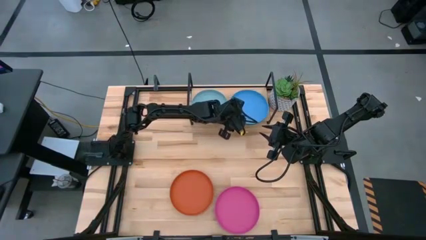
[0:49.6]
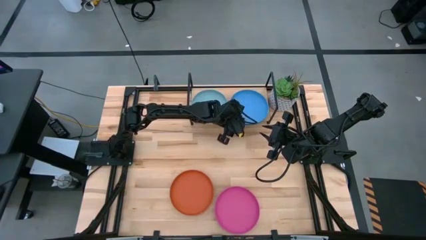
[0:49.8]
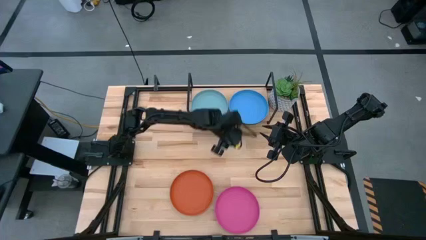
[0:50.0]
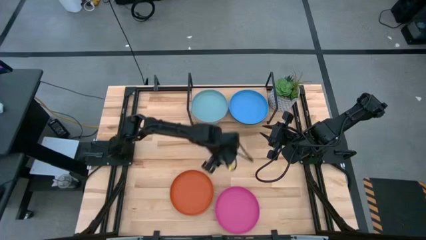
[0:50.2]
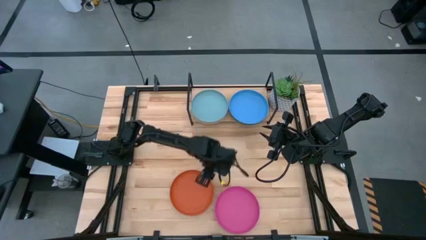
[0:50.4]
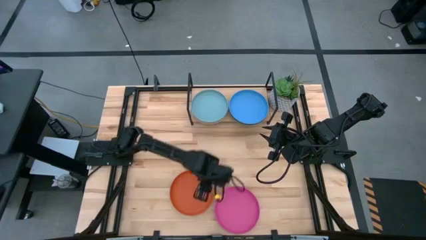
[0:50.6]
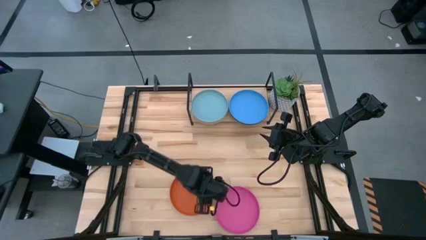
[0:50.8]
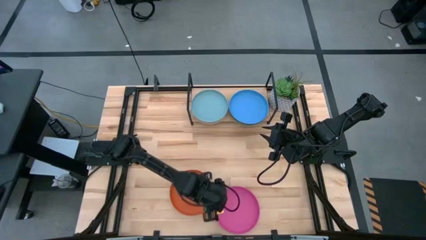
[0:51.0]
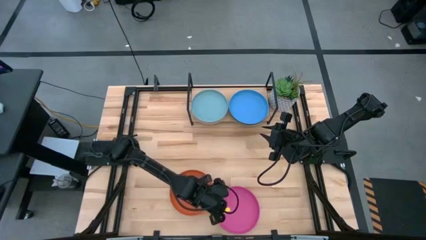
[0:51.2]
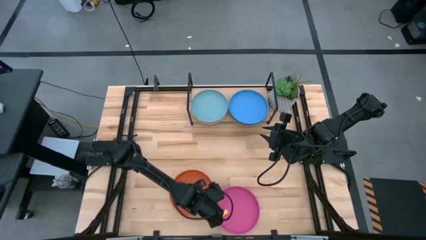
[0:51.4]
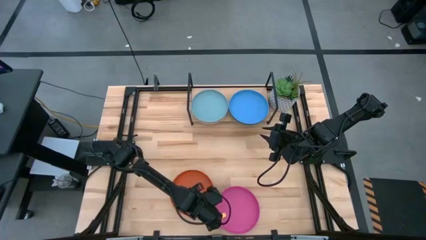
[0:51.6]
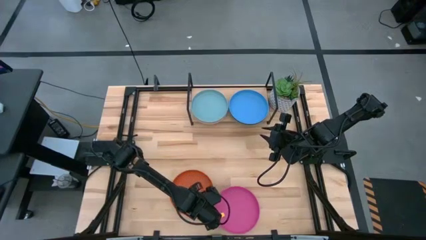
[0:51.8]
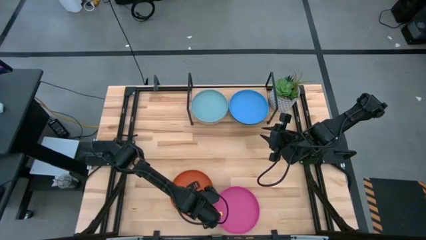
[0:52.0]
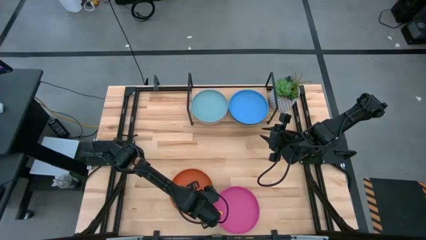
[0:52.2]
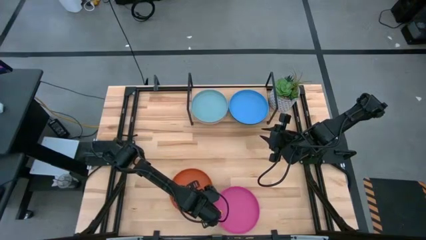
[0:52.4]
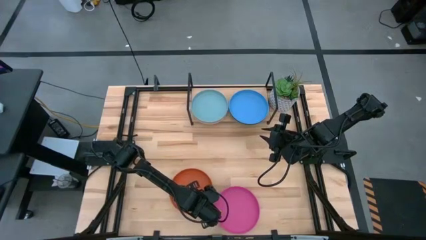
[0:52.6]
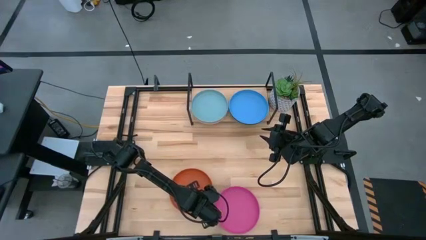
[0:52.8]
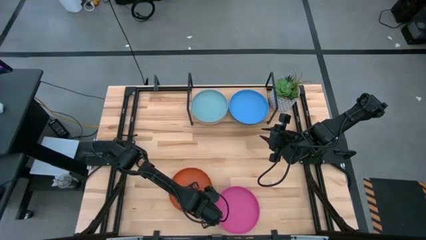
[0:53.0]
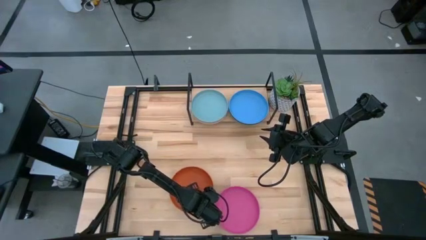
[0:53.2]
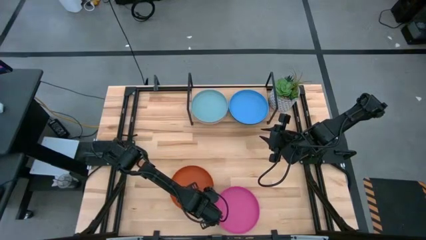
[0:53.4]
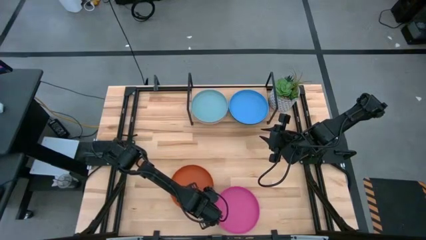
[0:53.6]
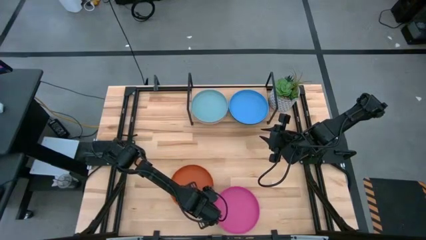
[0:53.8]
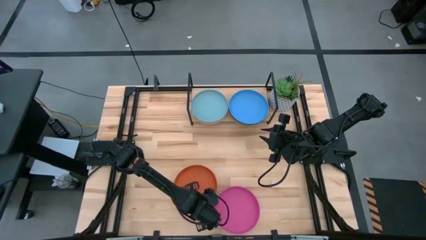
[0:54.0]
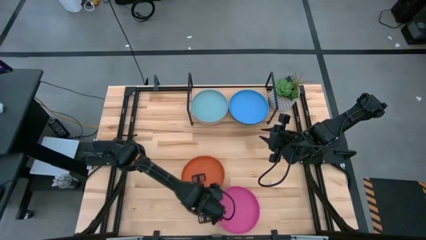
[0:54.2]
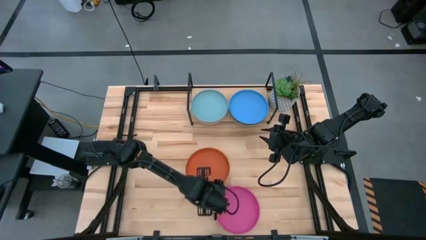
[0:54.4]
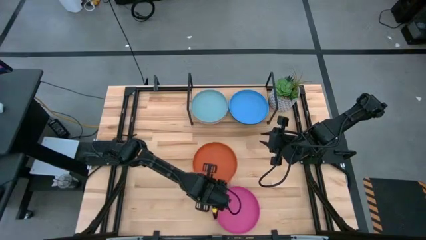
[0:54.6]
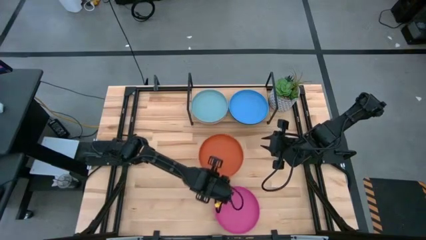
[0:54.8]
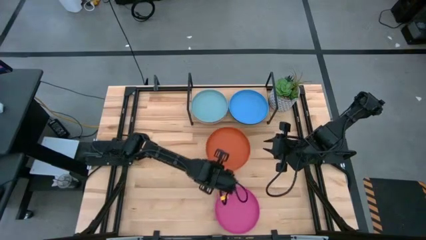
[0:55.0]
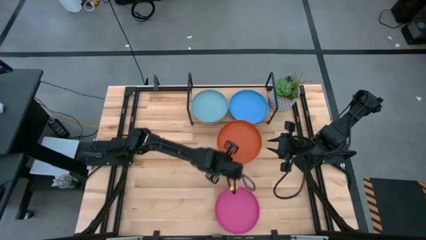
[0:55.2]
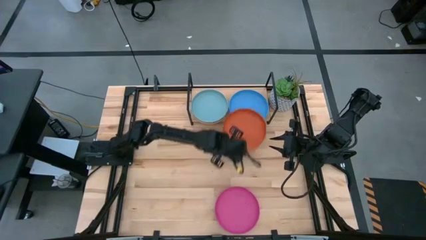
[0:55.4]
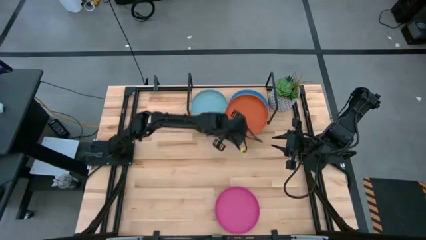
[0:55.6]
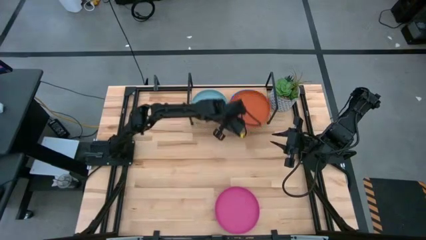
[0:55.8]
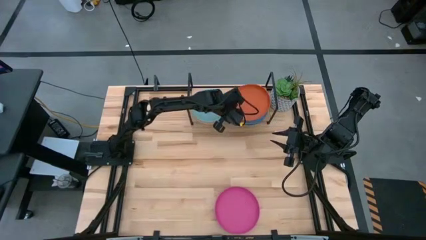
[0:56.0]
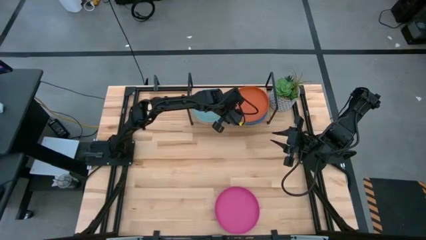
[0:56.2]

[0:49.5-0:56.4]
Task: Place and stack plates onto a shelf
Stack the orange plate on top of the blue plate on the shelf

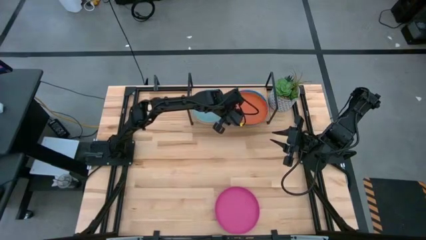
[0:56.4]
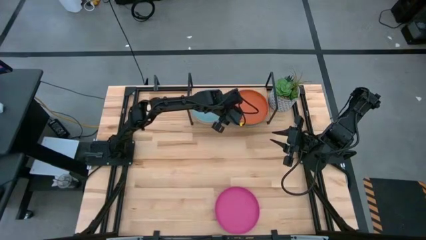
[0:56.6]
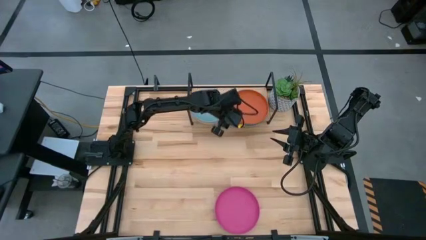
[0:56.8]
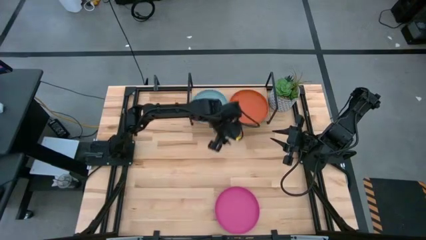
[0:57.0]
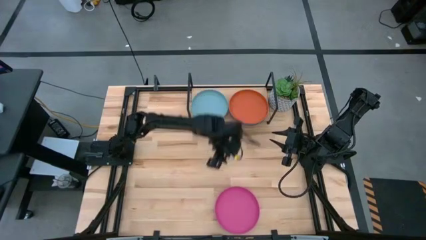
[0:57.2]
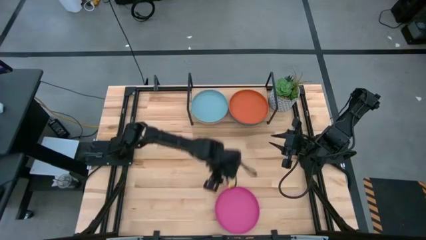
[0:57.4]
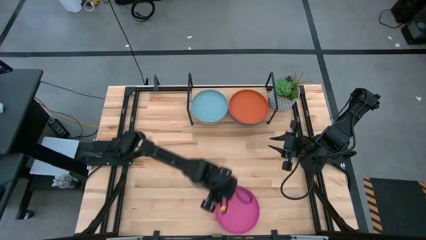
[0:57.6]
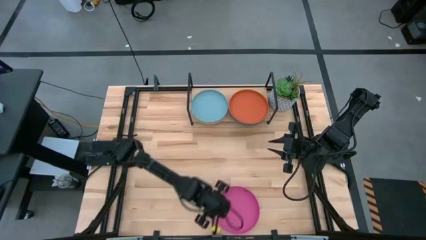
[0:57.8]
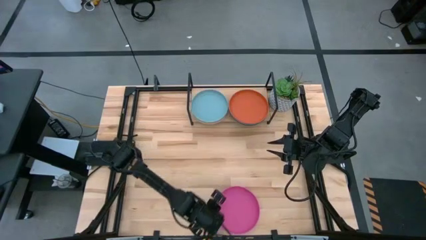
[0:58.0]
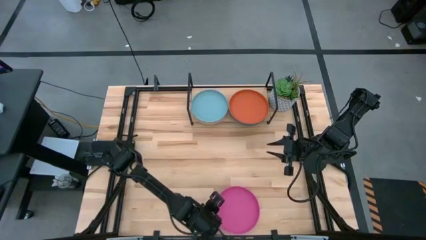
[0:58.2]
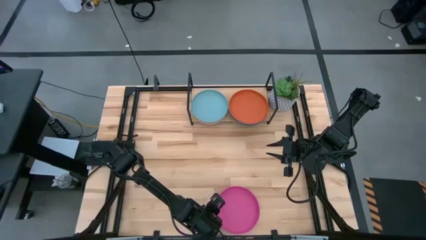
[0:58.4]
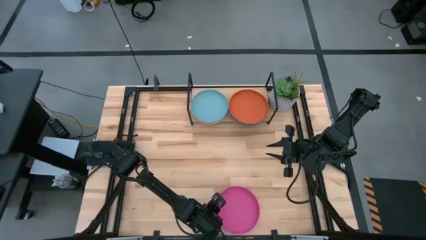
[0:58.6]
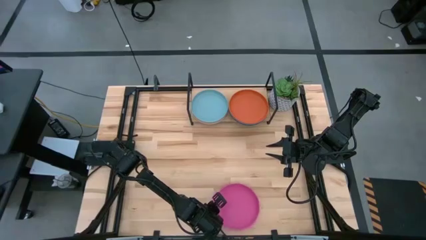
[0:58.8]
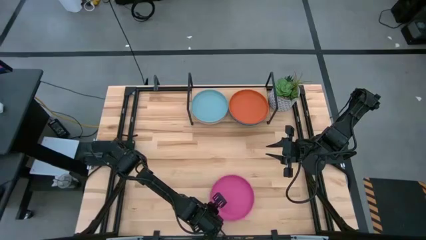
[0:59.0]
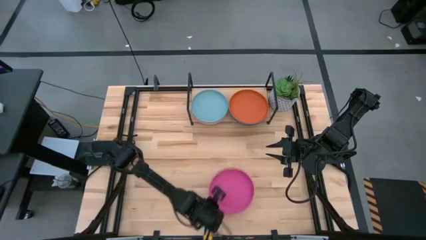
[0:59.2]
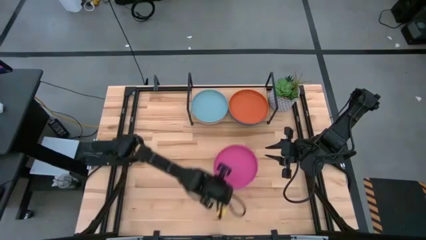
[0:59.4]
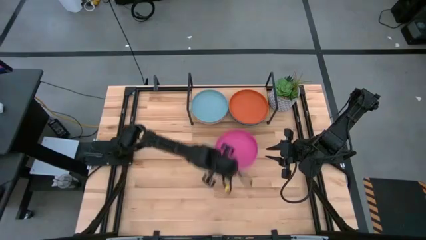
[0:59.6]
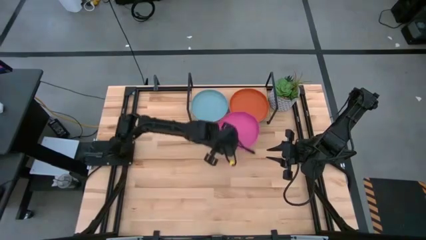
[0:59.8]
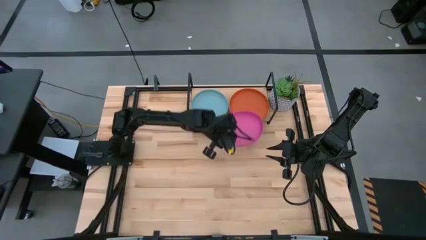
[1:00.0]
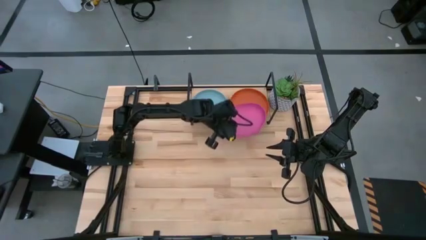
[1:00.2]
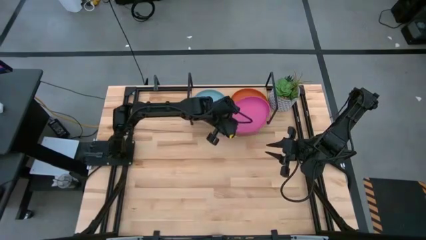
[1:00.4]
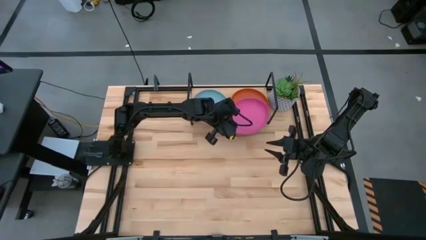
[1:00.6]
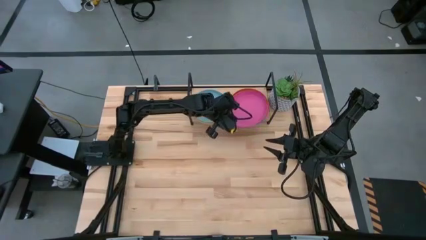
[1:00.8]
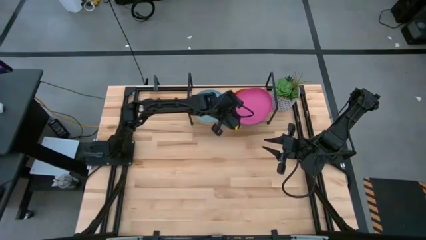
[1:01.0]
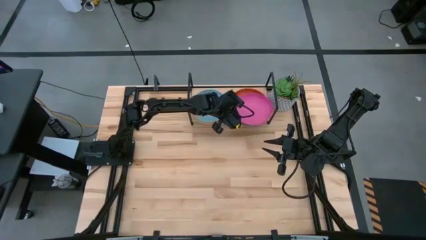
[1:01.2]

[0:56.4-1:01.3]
Stack the pink plate on top of the orange plate on the shelf
